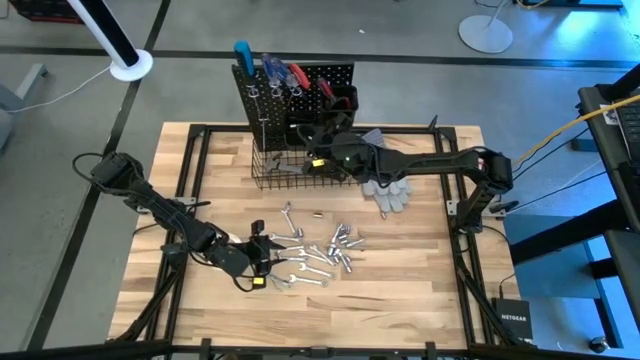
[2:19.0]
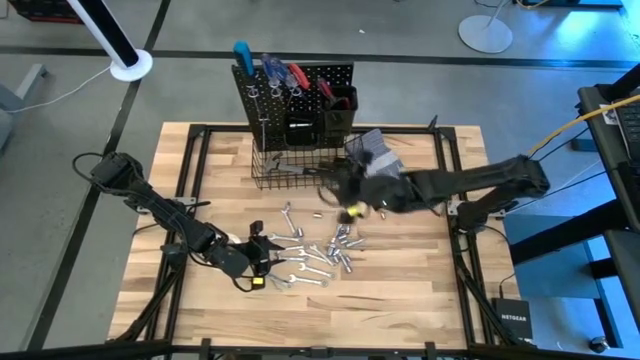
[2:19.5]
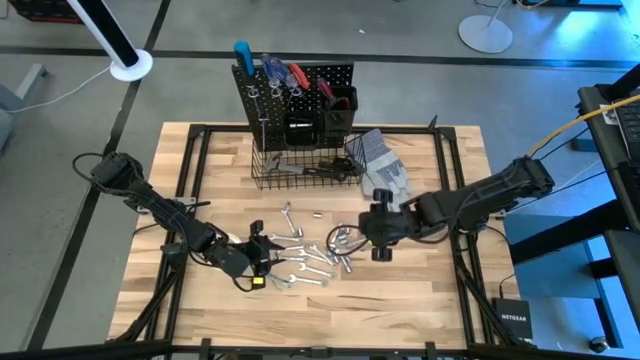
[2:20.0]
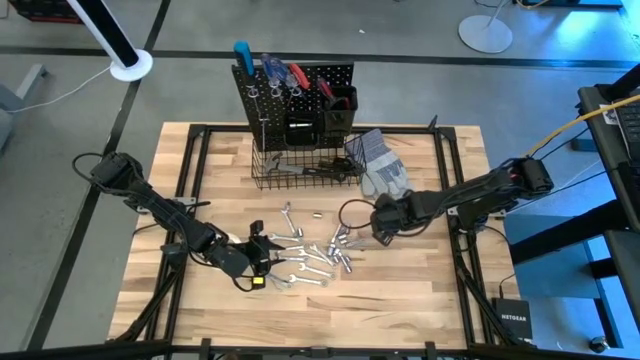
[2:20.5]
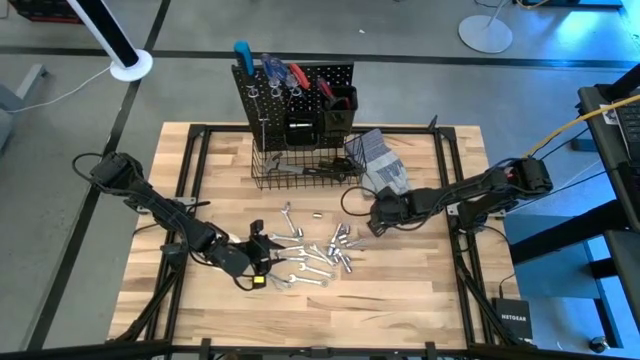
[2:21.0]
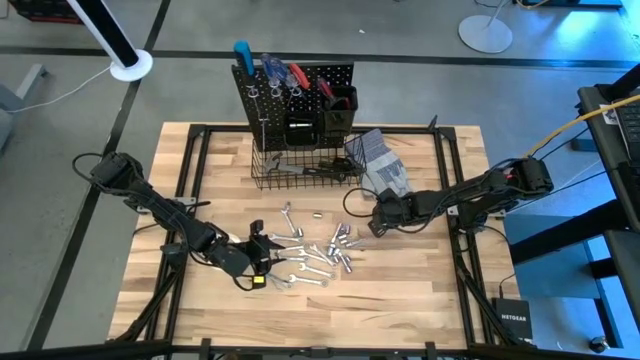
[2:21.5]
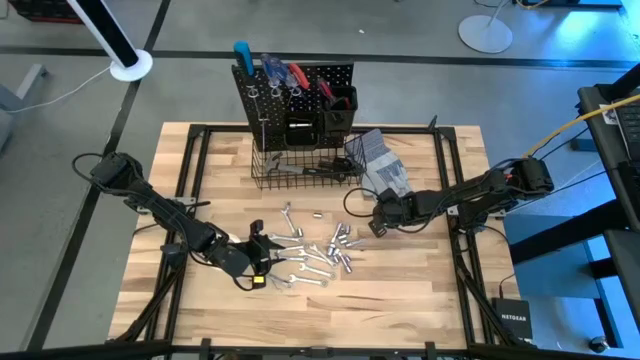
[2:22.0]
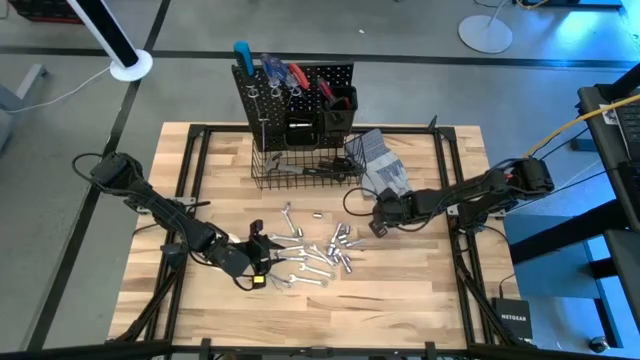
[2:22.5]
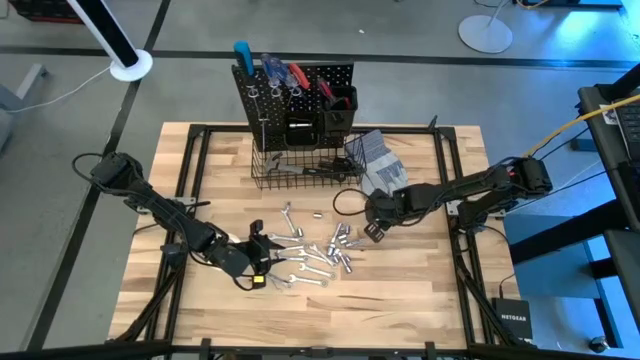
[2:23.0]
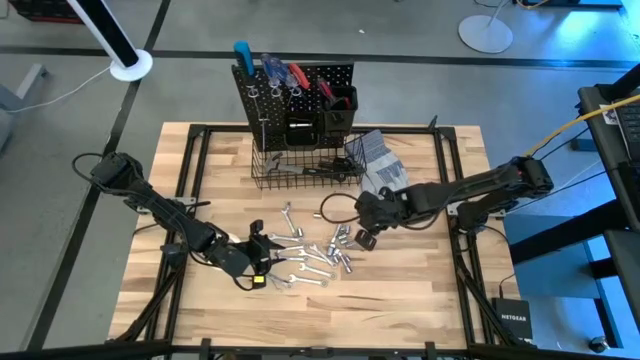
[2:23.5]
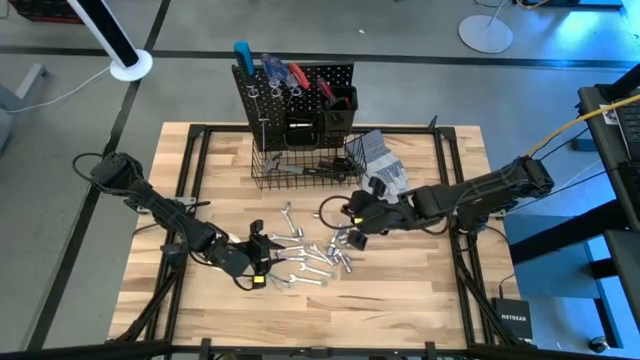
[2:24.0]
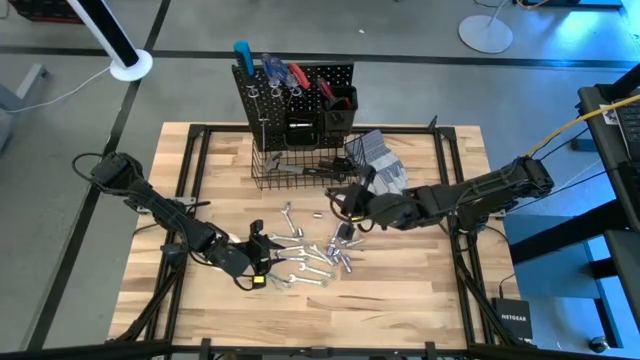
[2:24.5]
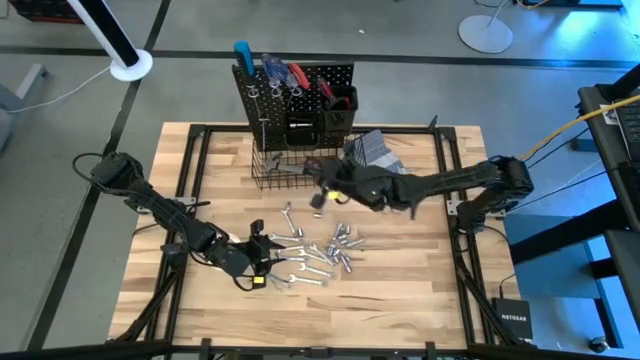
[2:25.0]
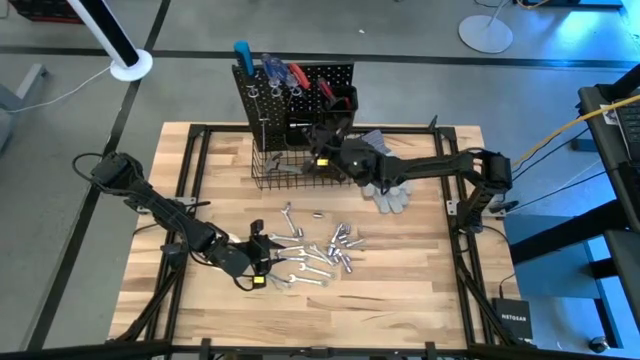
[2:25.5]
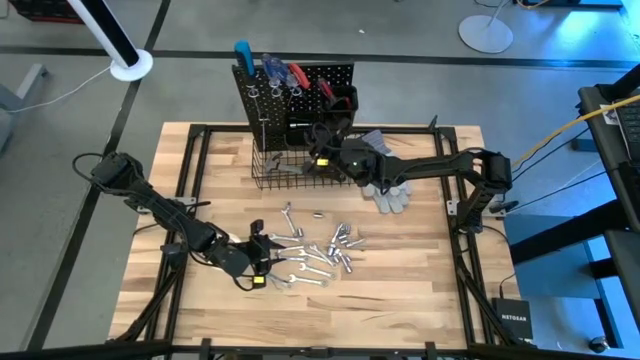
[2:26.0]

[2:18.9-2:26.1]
Task: Hang tools onto peg board
Put the socket into the left black bin on the peg board

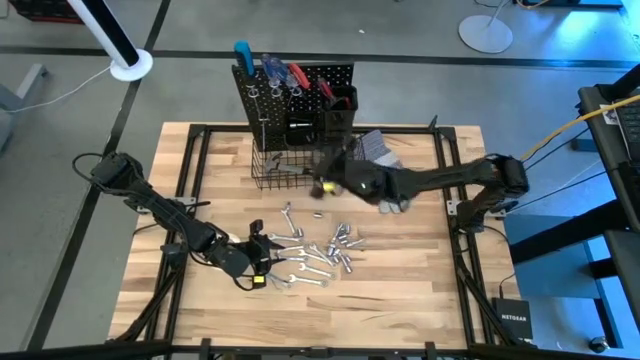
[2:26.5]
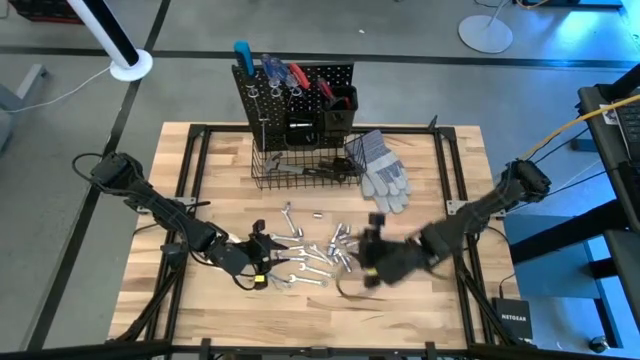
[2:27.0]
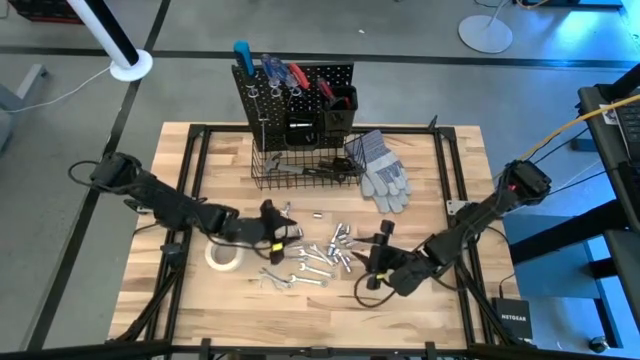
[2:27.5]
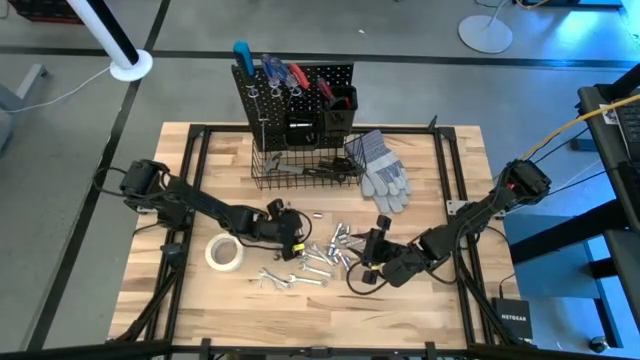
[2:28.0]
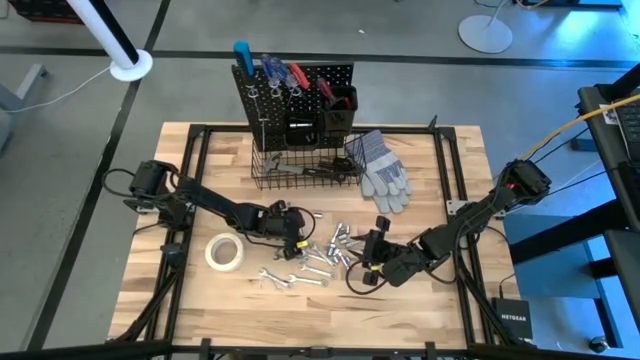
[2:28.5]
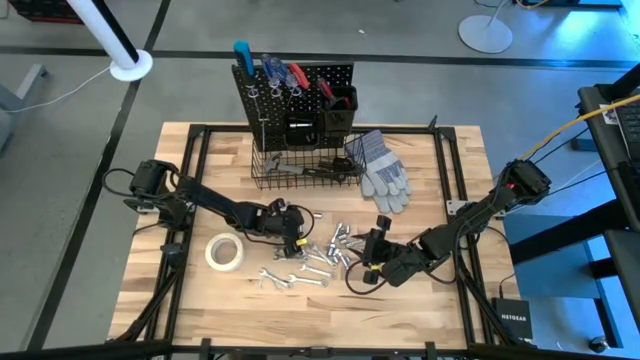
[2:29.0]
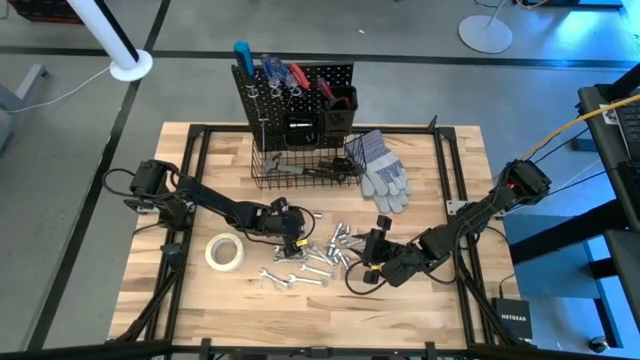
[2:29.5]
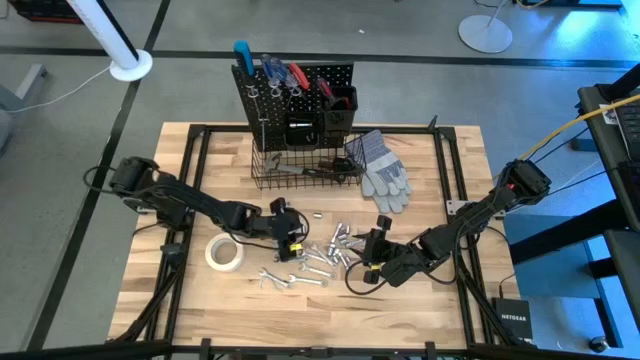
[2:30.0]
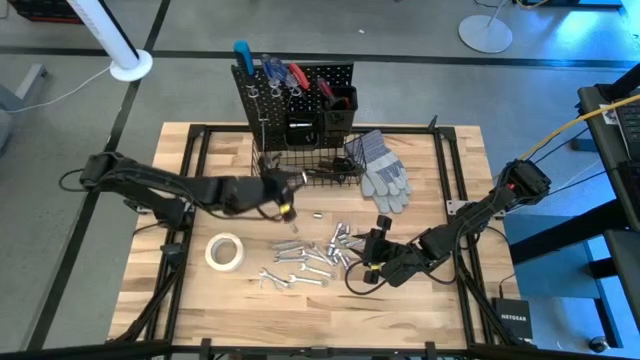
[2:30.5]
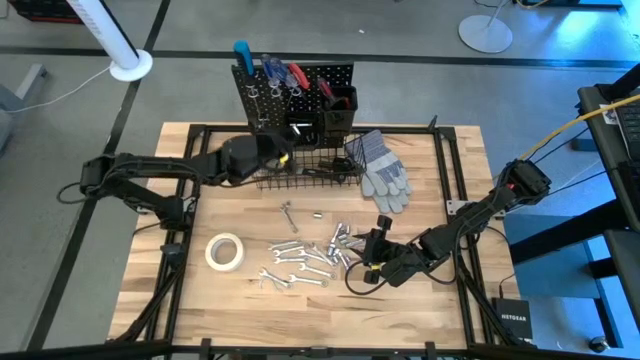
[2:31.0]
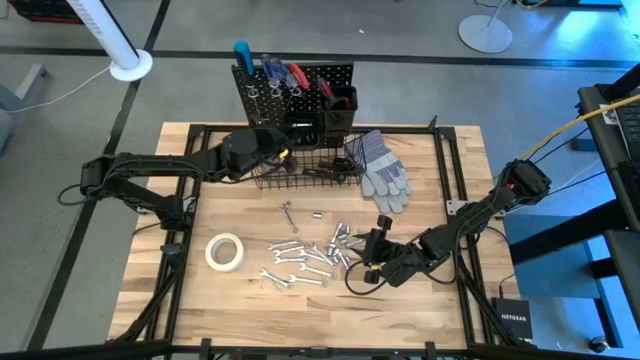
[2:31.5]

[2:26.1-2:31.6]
Put the socket into the left black bin on the peg board

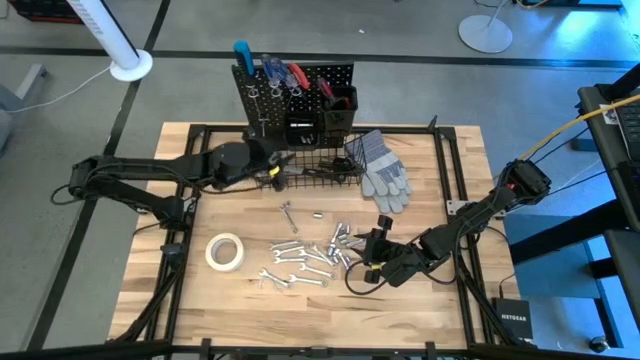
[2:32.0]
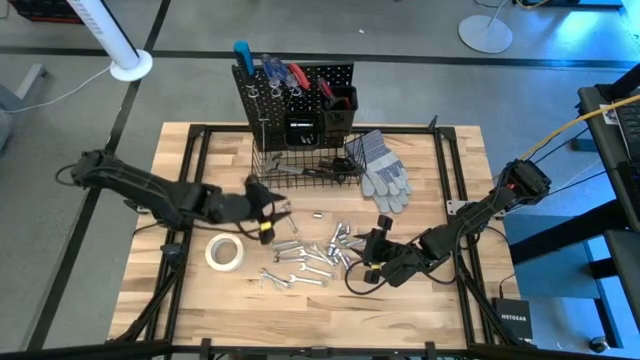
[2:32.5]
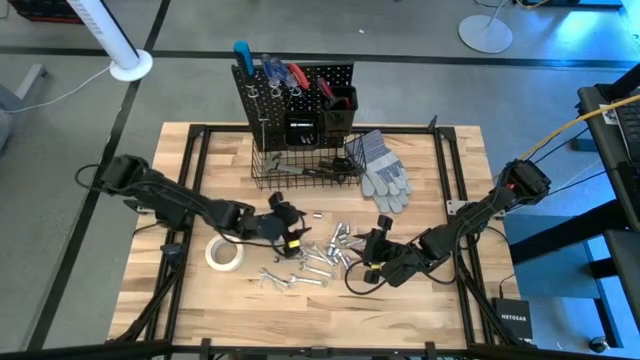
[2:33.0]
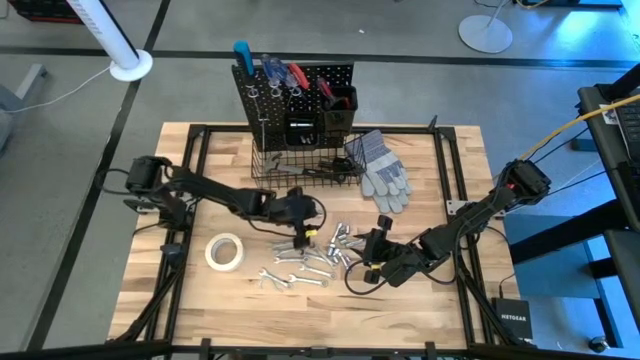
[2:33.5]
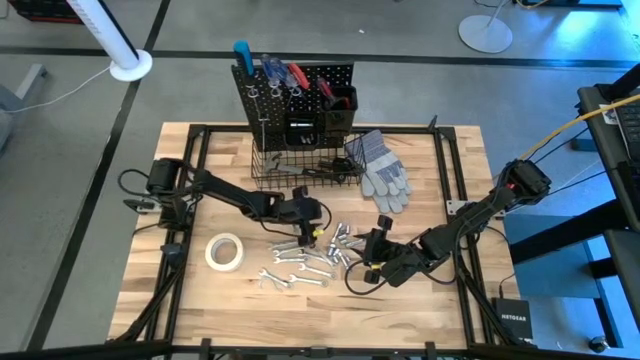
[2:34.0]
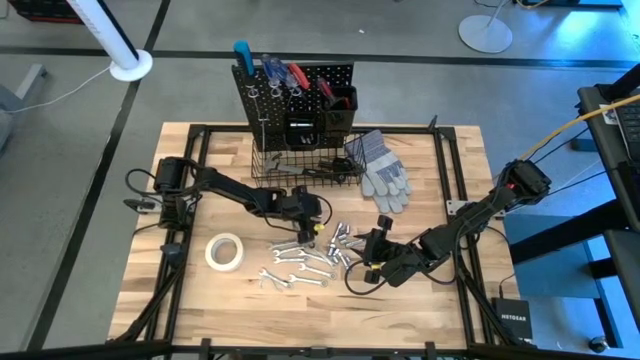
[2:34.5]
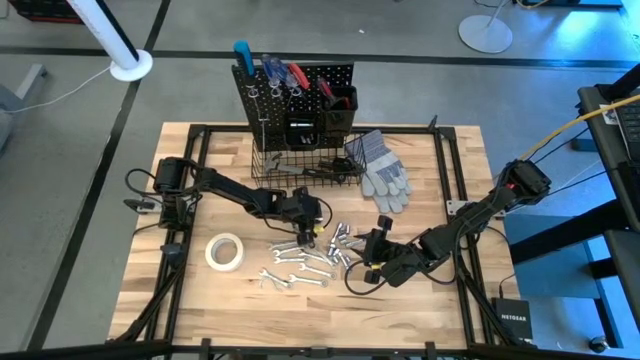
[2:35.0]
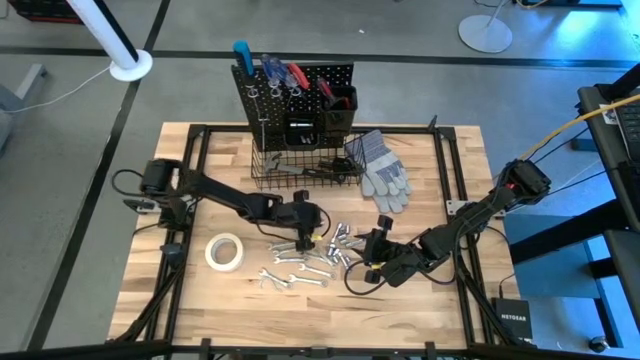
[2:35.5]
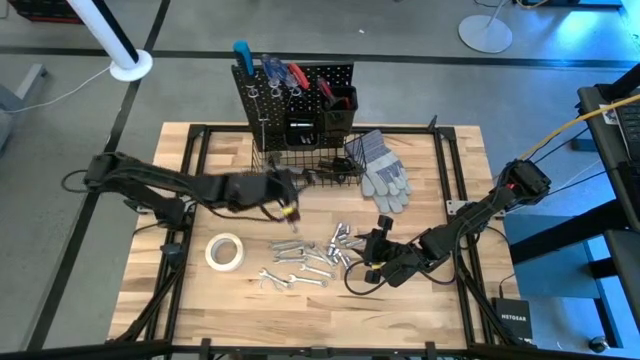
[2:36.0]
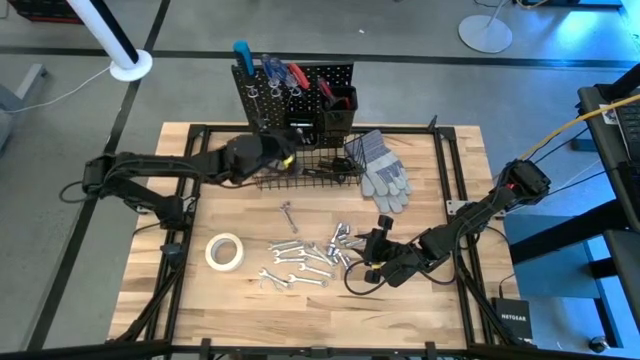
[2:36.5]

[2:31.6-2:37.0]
Put the socket into the left black bin on the peg board

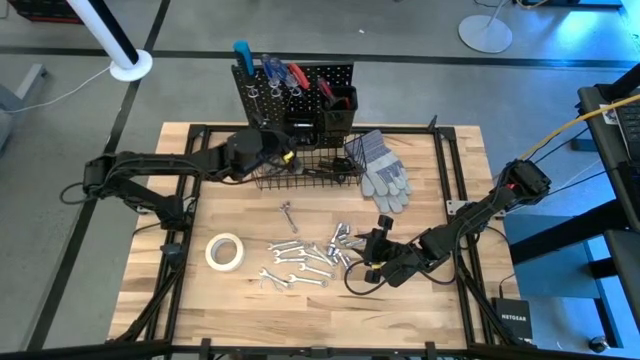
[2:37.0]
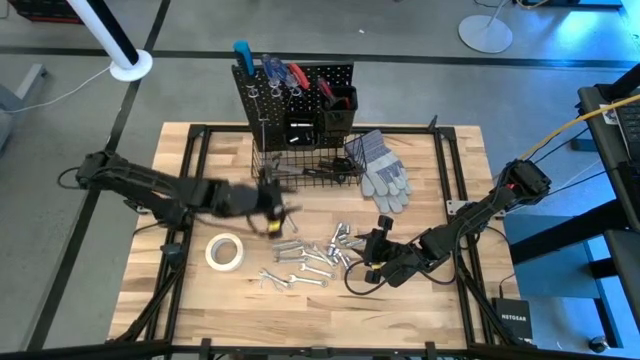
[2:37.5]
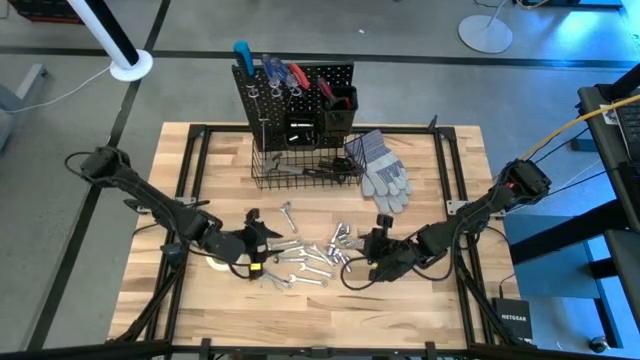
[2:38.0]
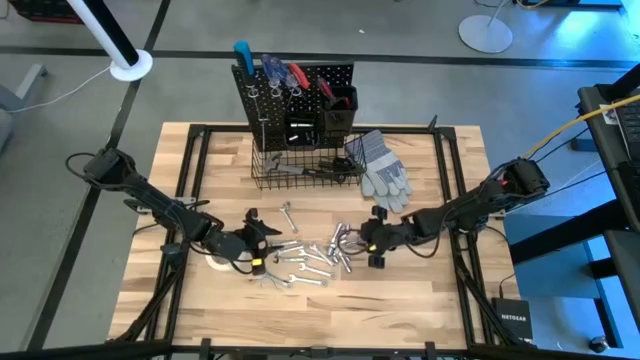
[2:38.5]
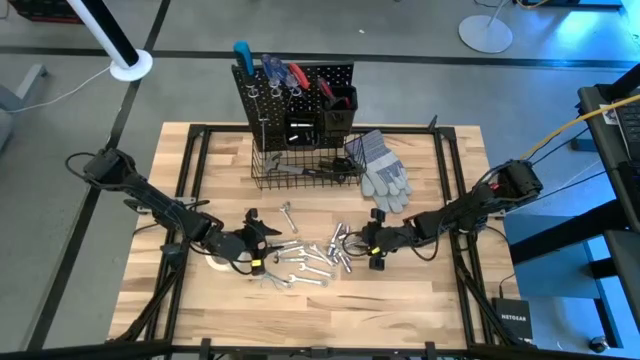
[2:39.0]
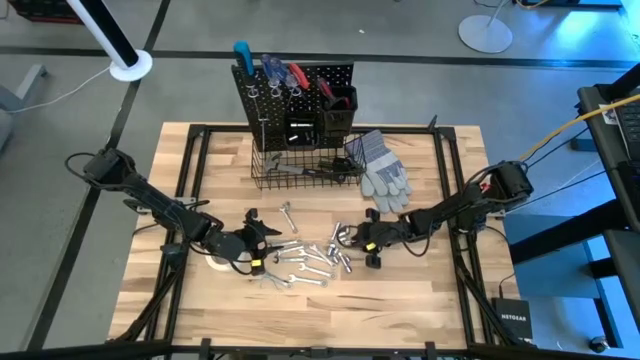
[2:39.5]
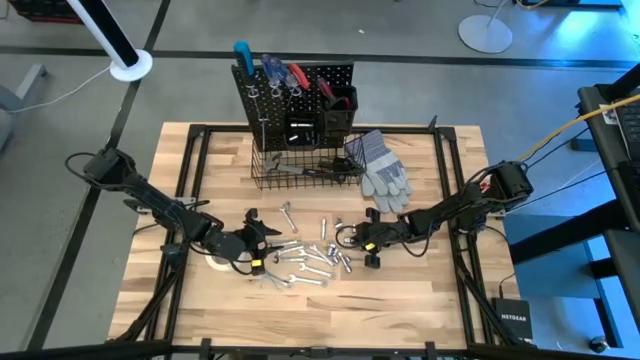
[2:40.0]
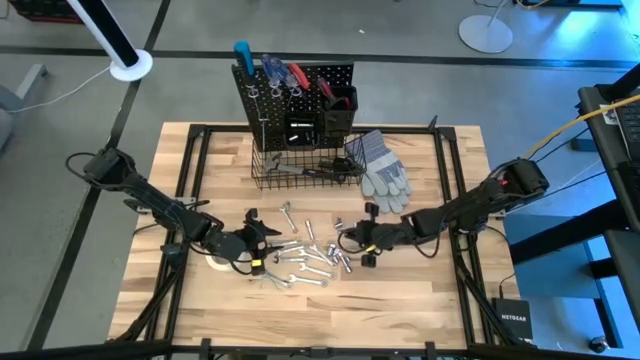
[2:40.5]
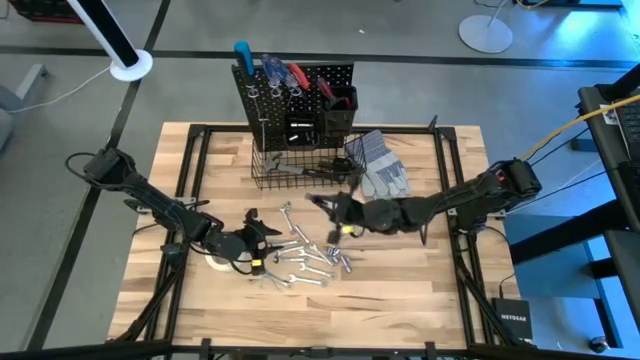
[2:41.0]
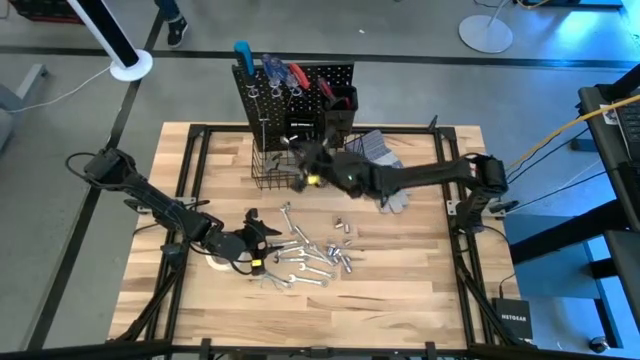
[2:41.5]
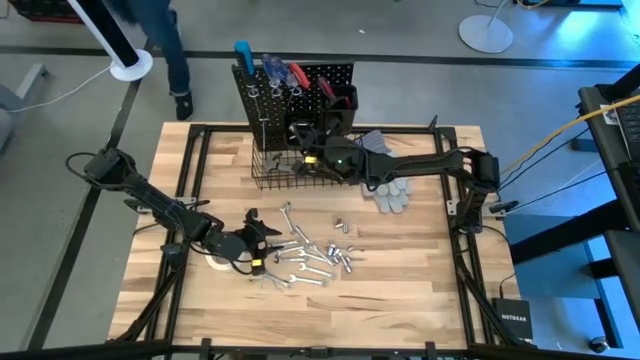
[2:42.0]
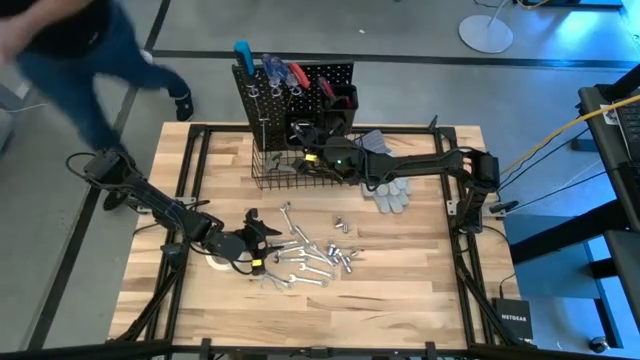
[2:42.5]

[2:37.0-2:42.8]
Put the extension bar into the left black bin on the peg board
